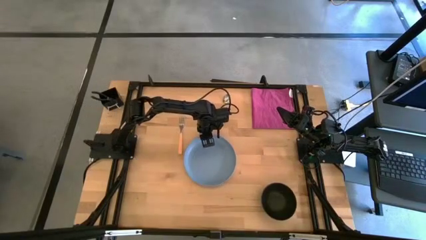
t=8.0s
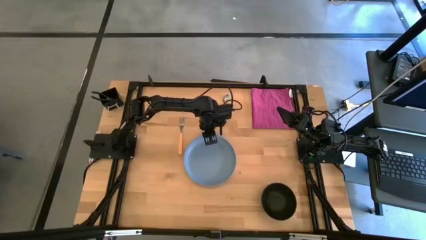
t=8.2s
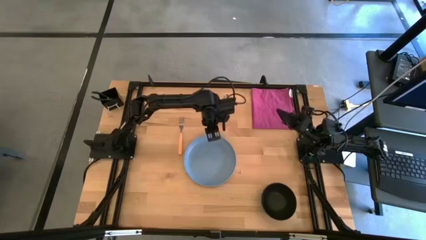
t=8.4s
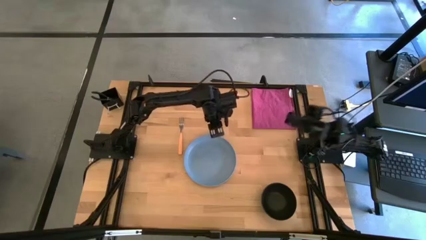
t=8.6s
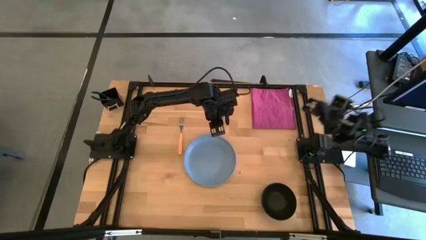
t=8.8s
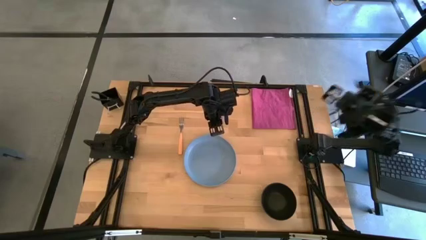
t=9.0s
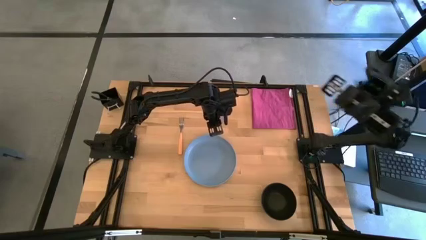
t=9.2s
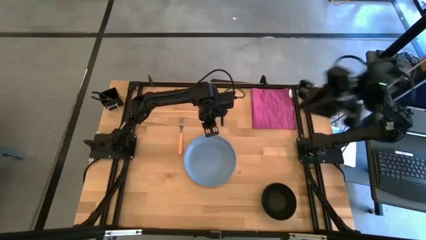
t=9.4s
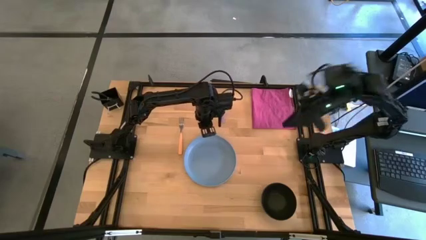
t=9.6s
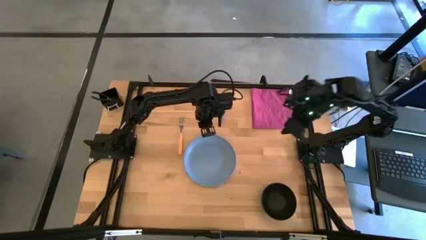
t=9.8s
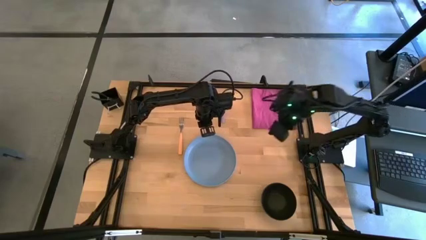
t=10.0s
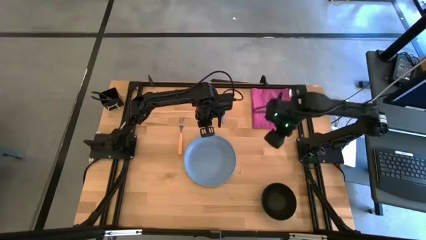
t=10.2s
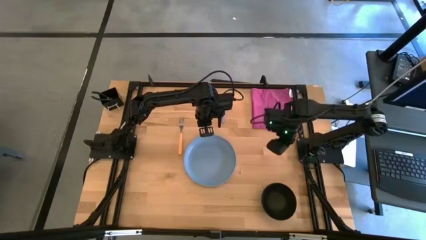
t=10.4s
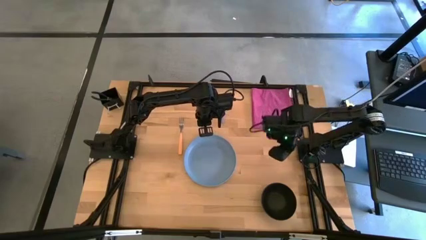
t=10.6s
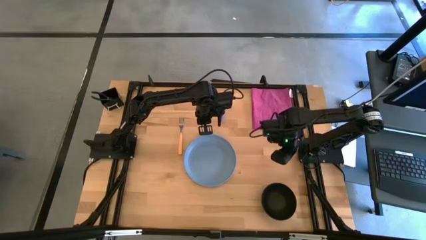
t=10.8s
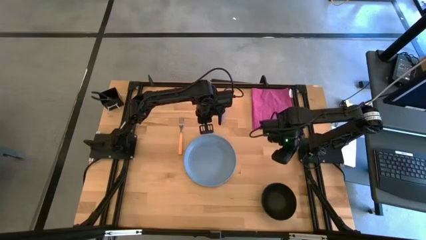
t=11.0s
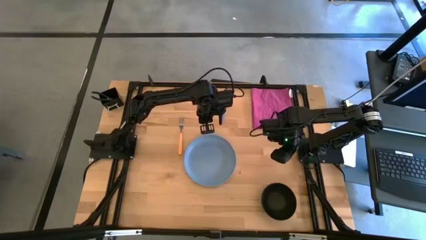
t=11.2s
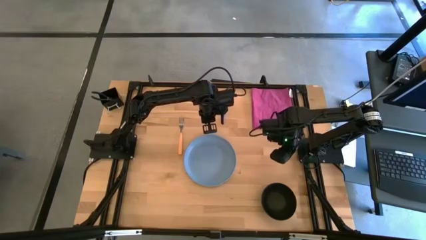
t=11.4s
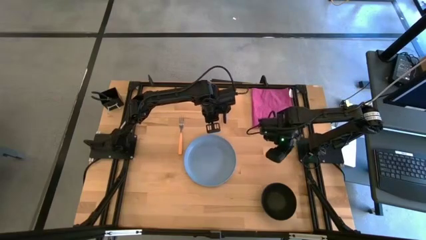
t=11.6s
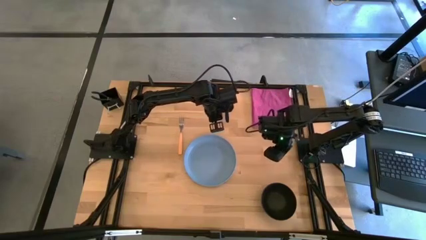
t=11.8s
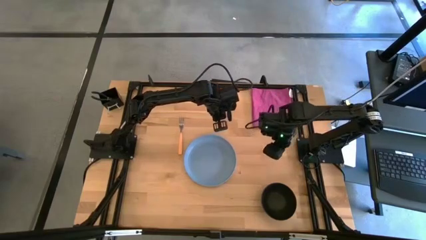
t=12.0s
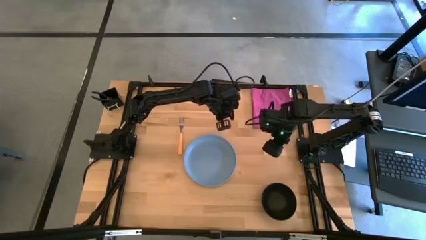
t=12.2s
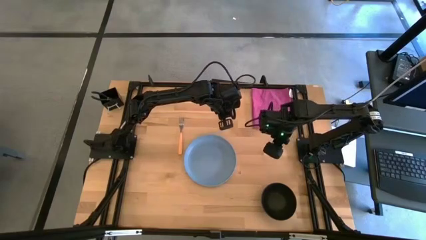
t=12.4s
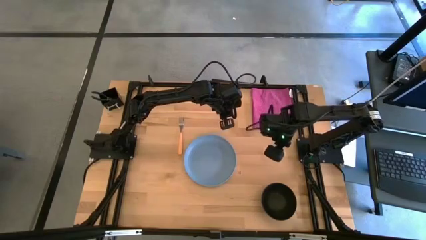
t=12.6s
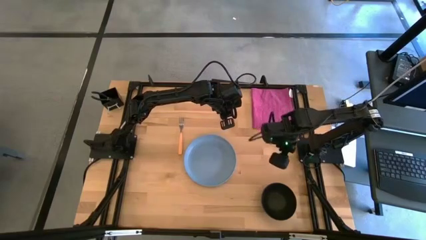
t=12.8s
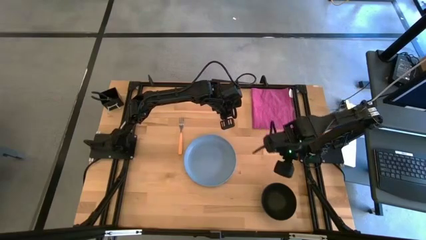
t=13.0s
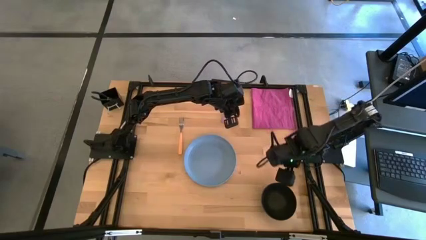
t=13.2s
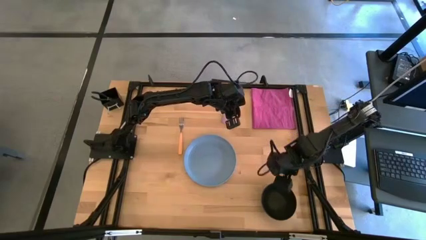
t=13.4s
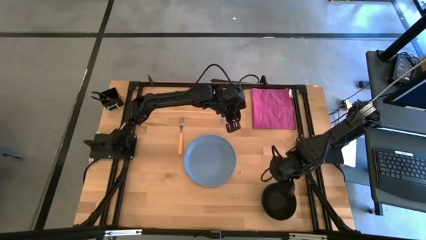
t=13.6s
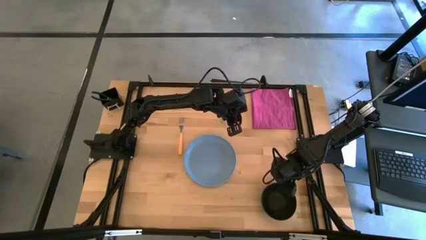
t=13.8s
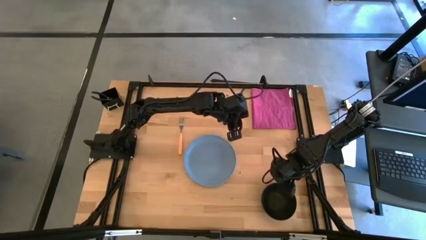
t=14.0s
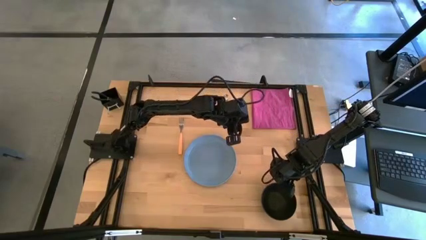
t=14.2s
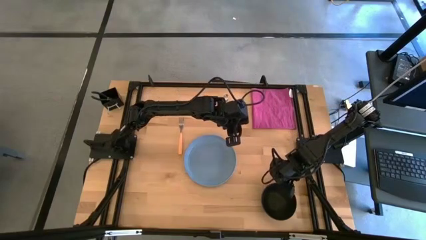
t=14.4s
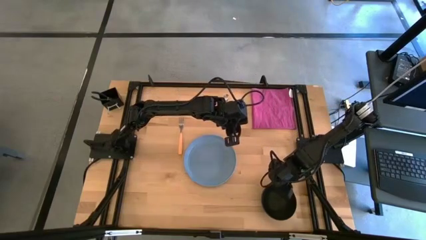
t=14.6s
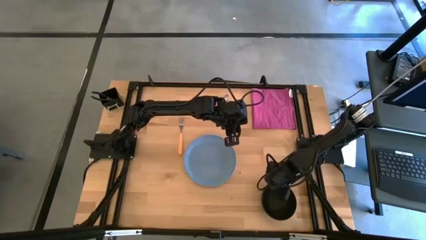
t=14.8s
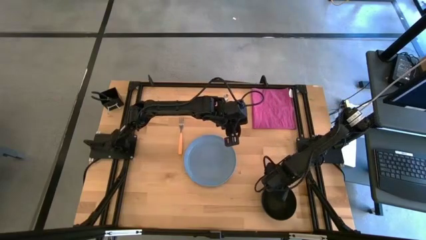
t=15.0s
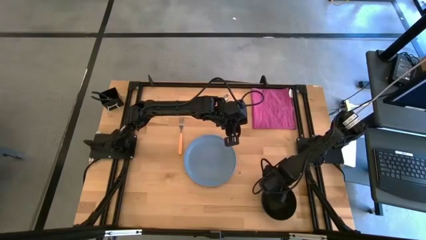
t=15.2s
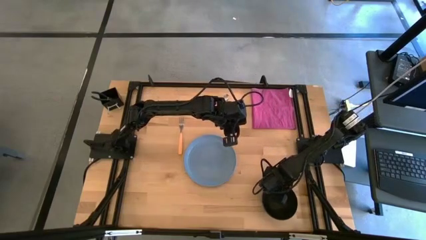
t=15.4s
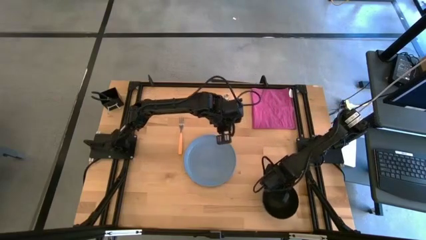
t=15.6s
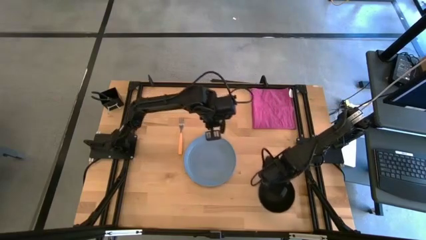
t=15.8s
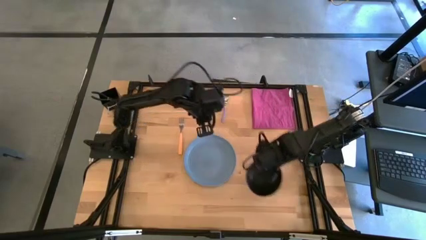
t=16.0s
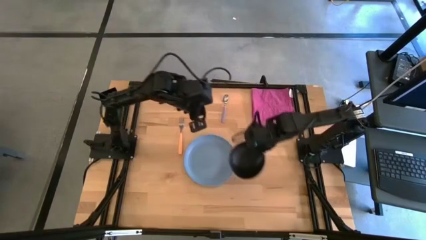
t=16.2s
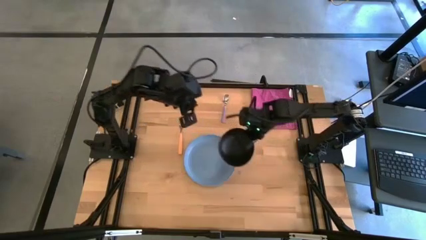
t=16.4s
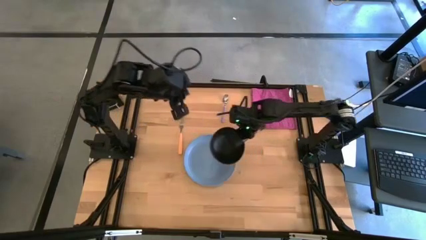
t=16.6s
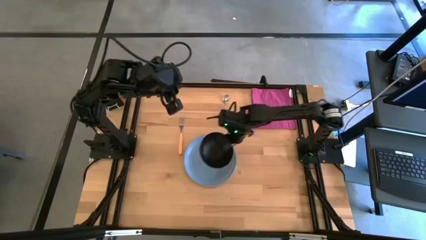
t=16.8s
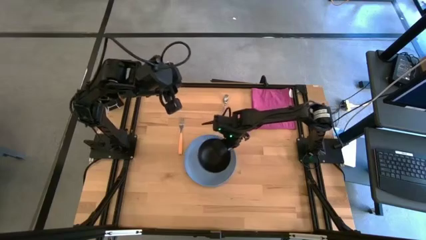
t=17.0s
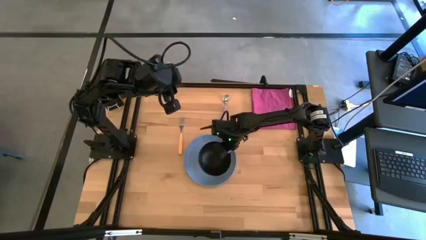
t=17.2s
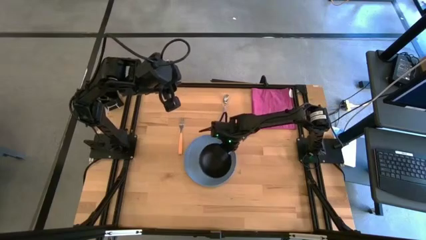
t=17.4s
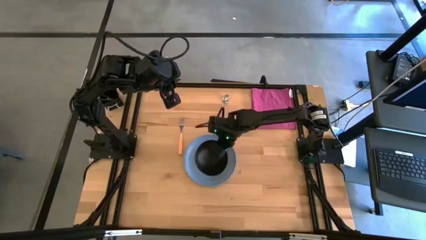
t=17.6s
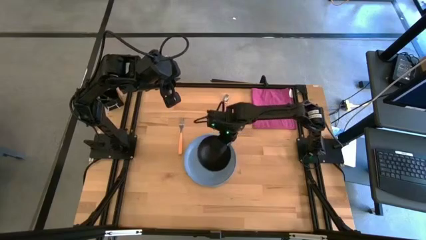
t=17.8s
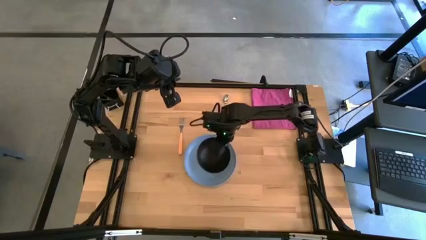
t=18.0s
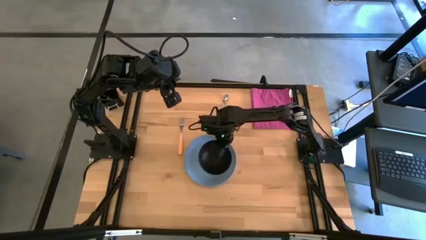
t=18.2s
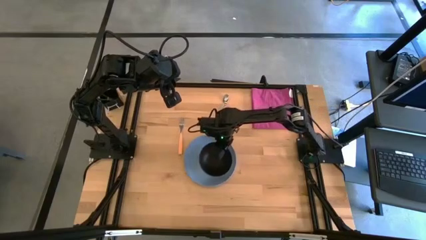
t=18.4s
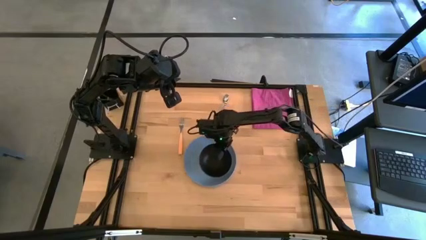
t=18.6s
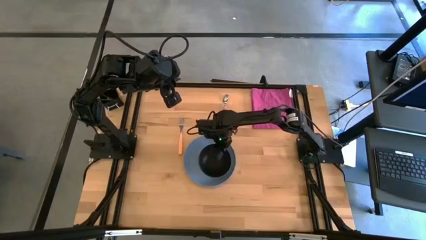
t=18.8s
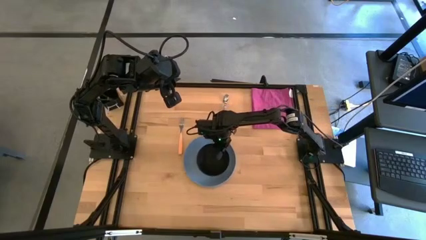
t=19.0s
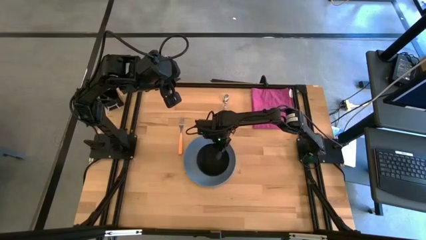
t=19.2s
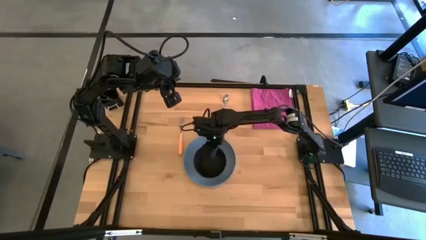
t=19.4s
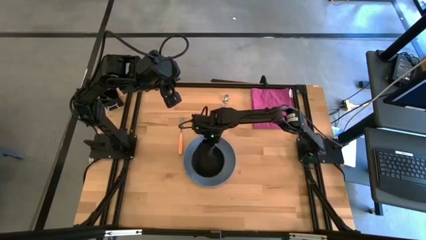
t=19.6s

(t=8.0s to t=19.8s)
Task: Set table place
Put the black bowl on top of the blue plate
